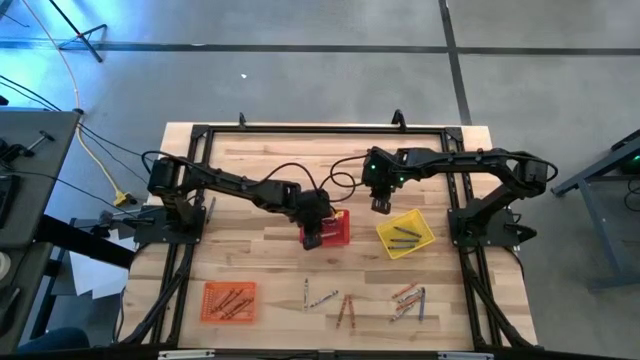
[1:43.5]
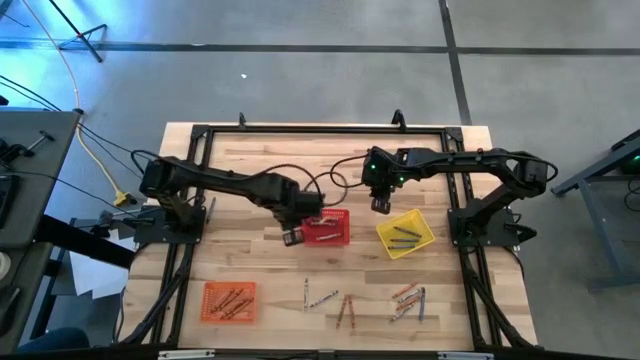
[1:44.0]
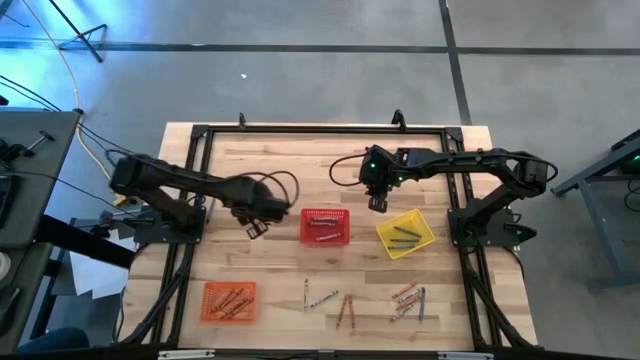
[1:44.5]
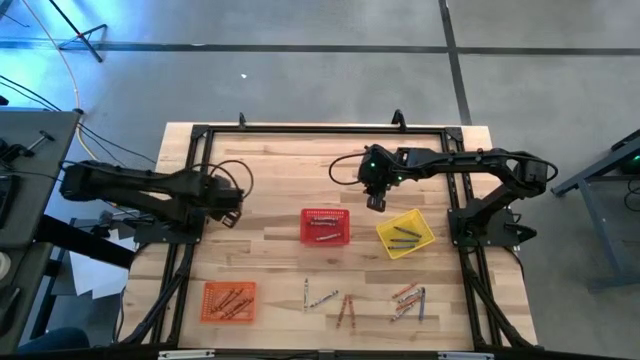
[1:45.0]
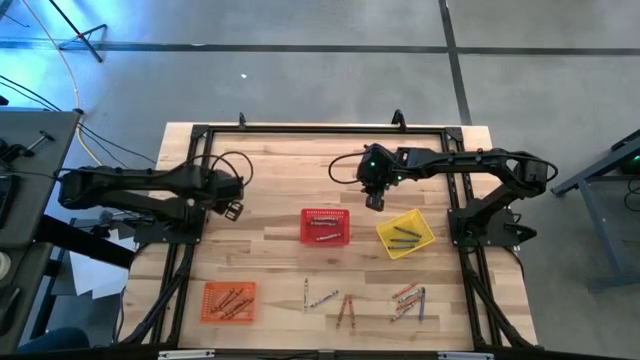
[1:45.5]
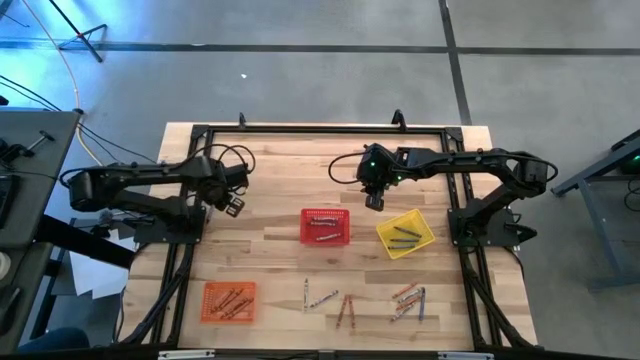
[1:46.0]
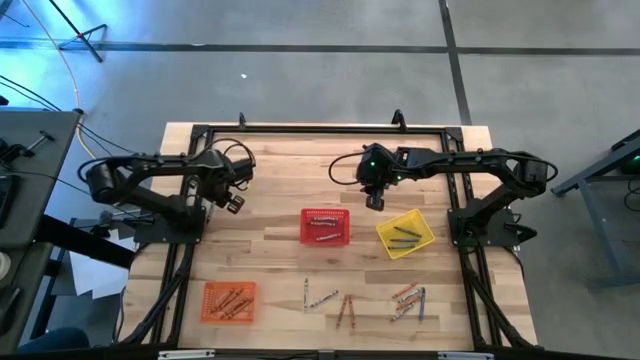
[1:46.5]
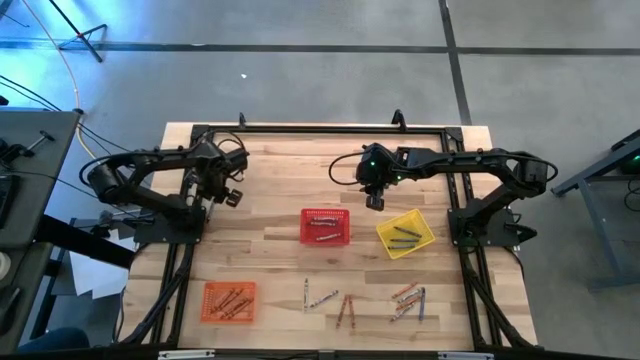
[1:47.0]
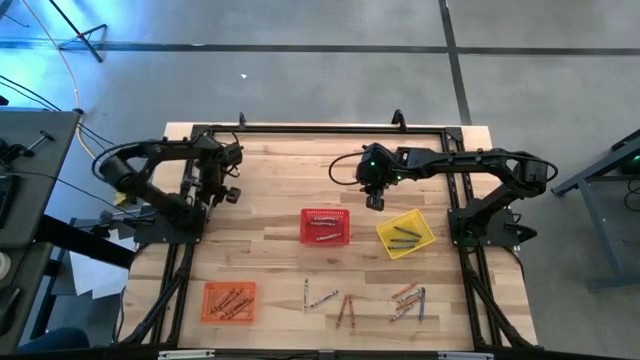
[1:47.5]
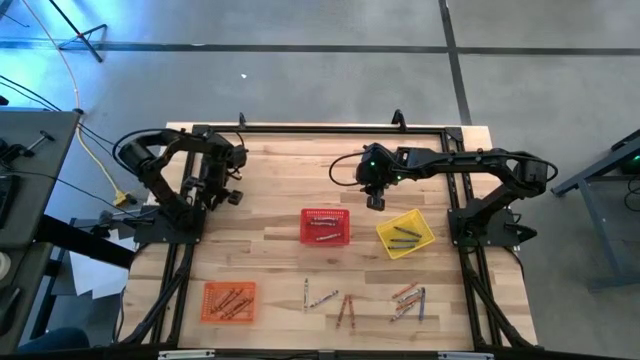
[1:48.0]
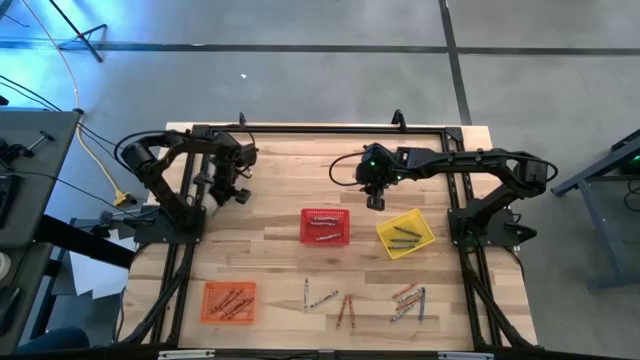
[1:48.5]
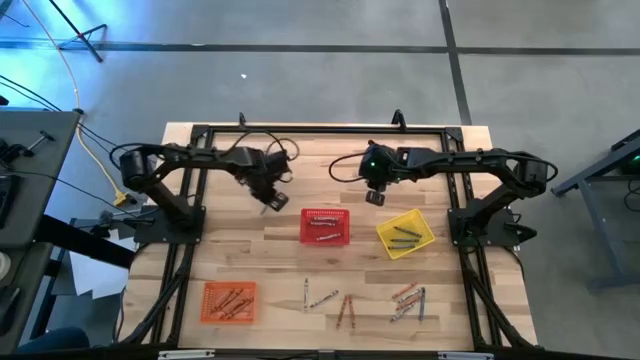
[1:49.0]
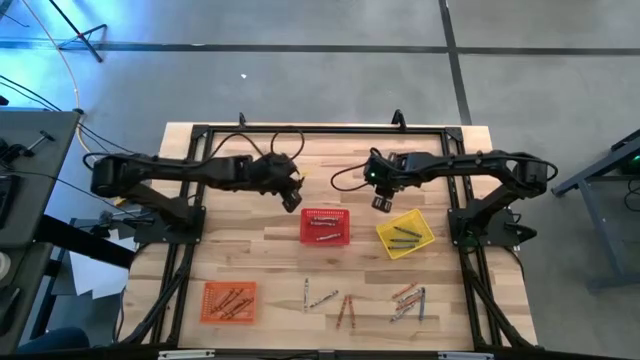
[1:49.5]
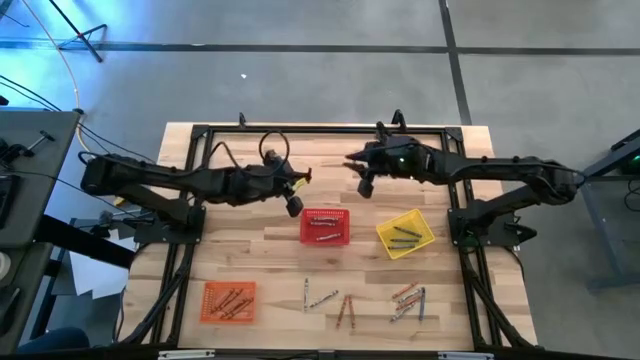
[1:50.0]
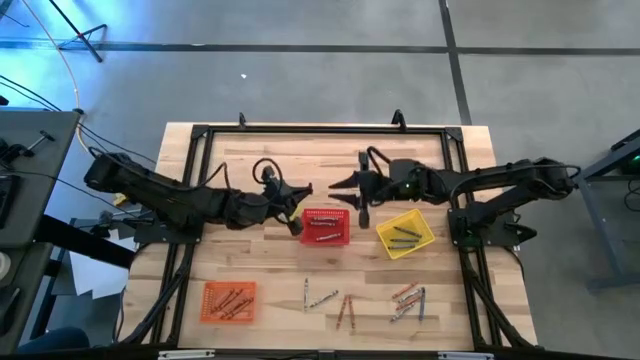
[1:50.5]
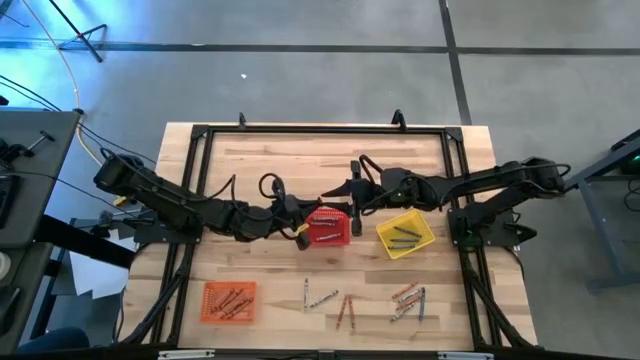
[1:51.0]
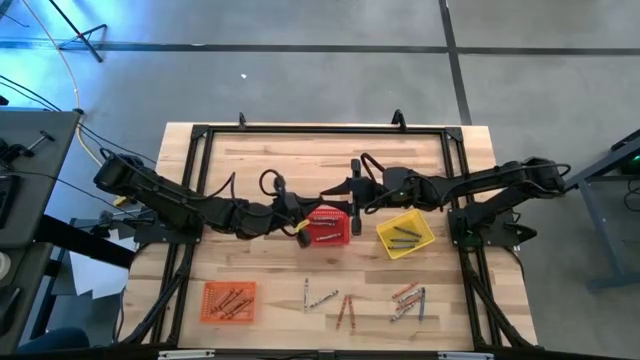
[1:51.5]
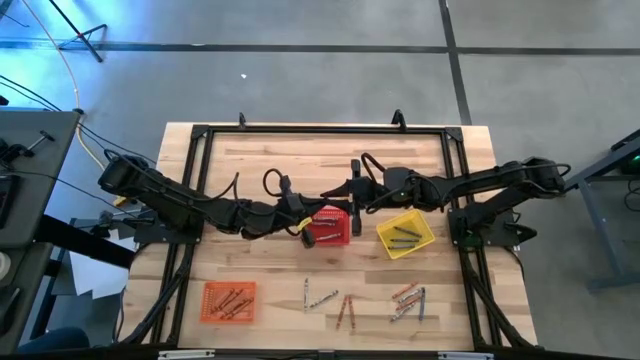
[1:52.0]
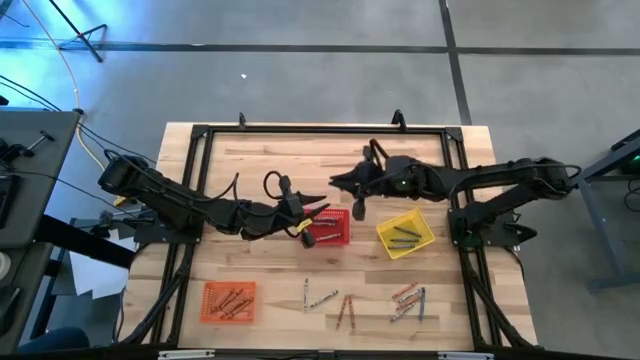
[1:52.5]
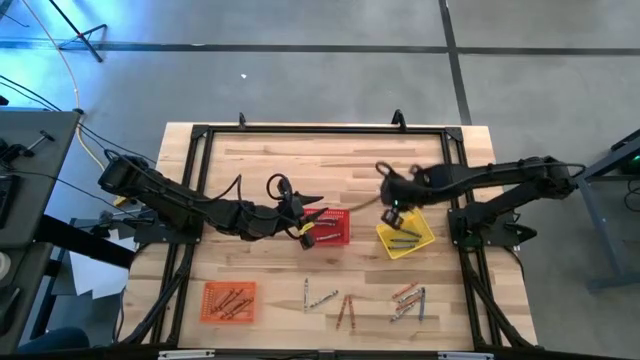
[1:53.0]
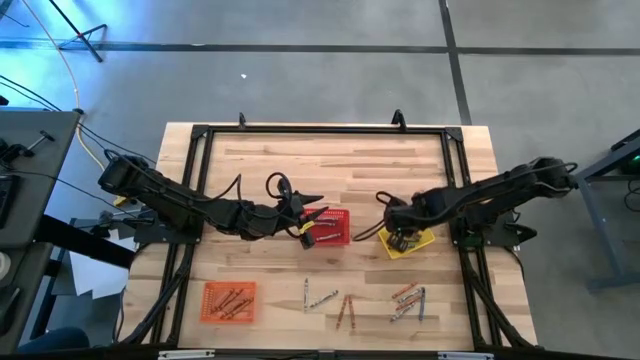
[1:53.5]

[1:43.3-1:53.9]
Task: Sort crayons
Put the blue crayon into the yellow bin

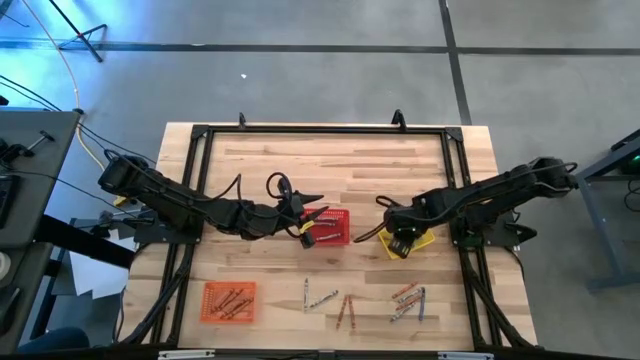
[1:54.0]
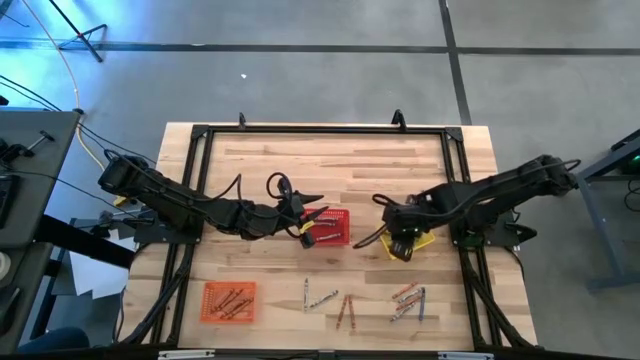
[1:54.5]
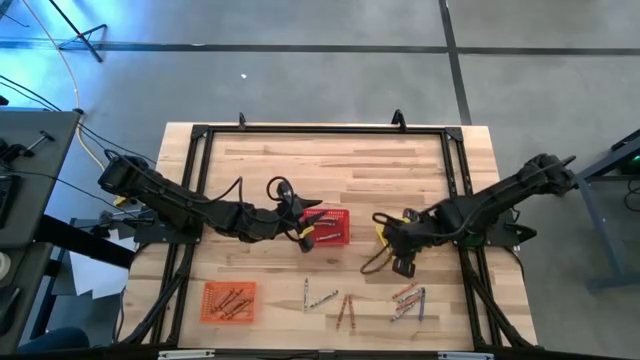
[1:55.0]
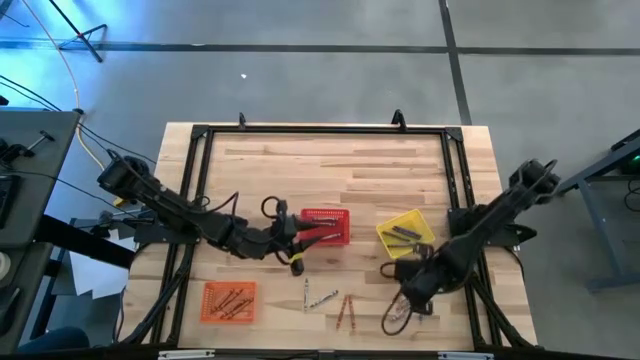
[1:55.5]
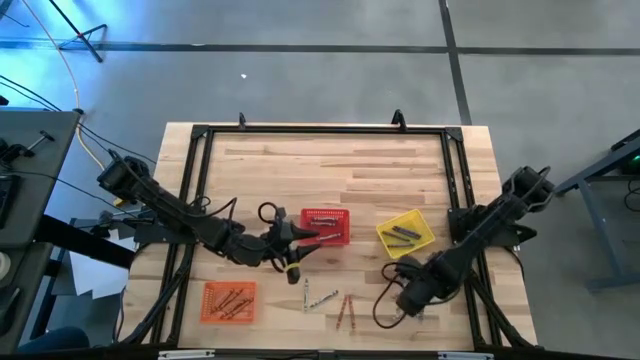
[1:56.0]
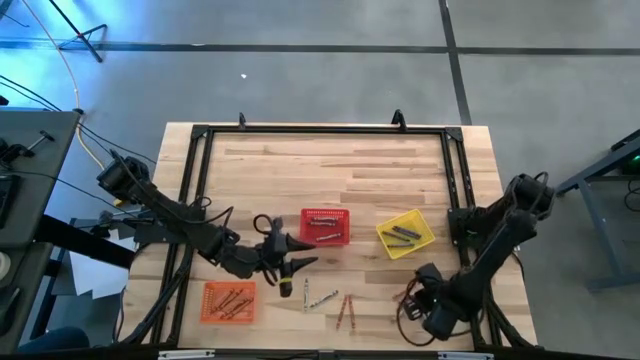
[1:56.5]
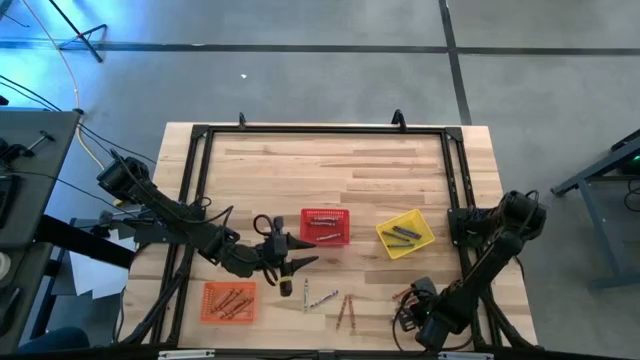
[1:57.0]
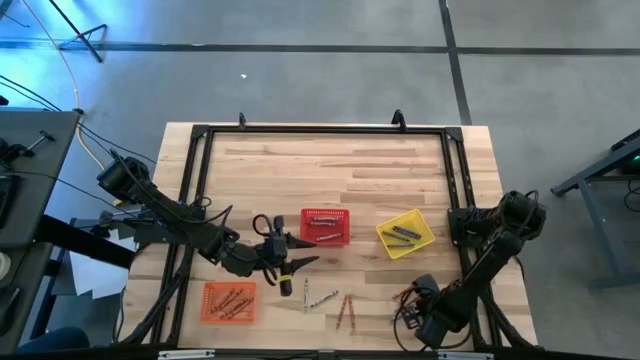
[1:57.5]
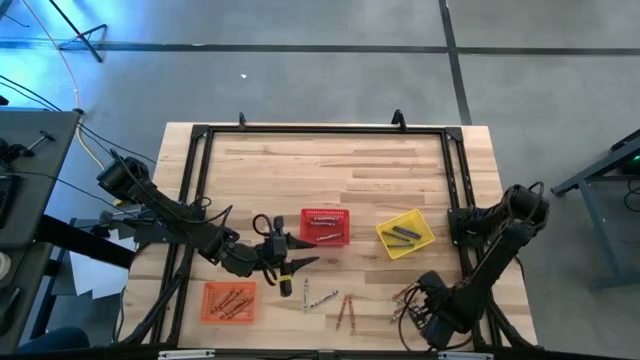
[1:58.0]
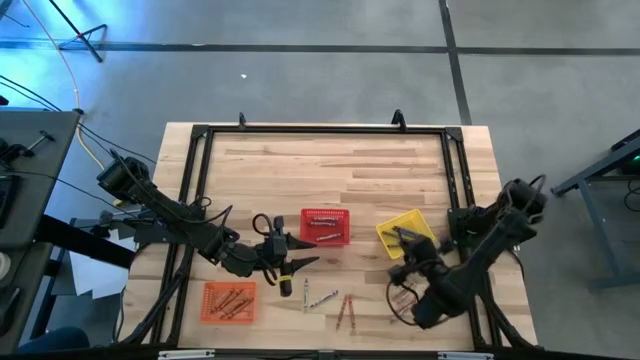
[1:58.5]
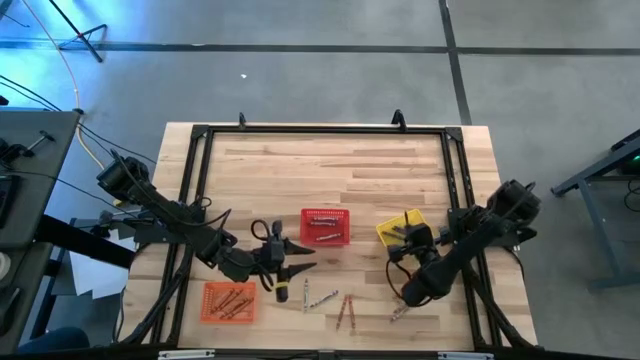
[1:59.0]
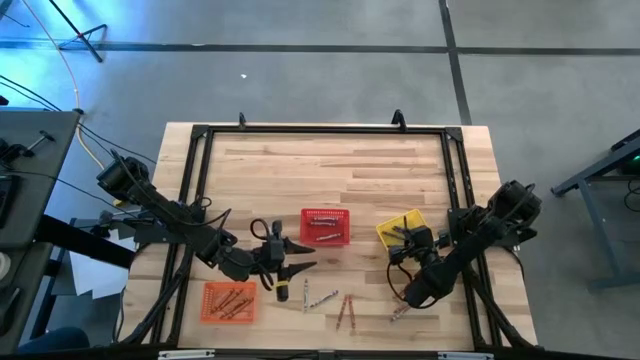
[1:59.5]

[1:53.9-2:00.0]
Put the blue crayon into the yellow bin

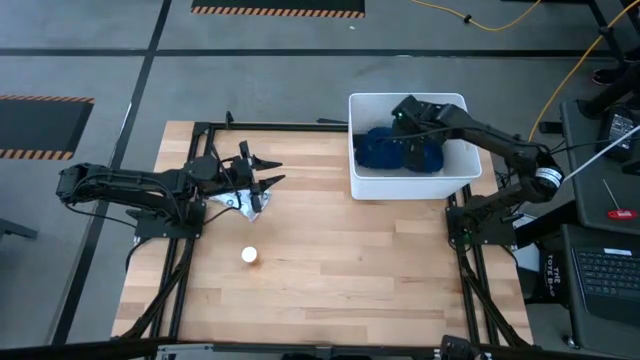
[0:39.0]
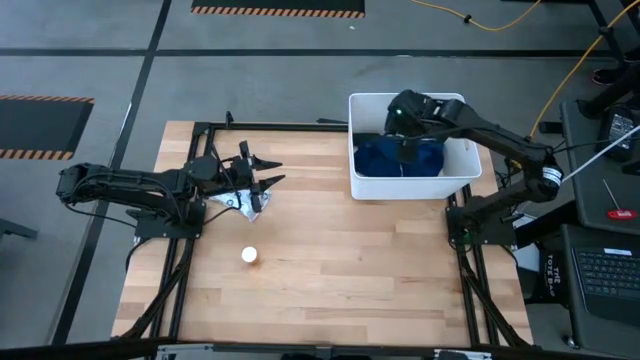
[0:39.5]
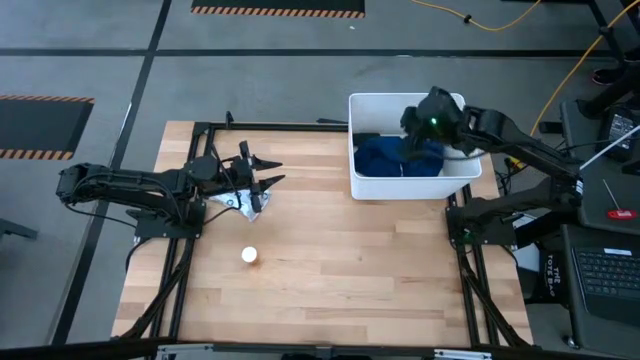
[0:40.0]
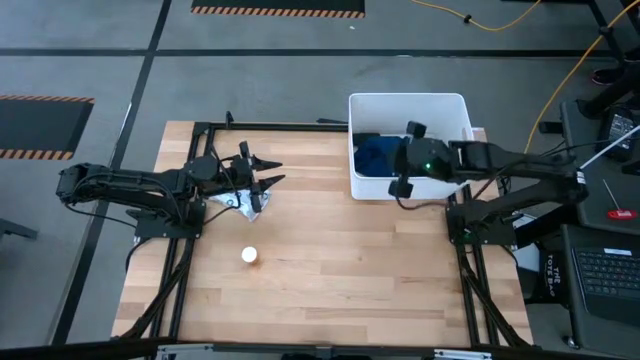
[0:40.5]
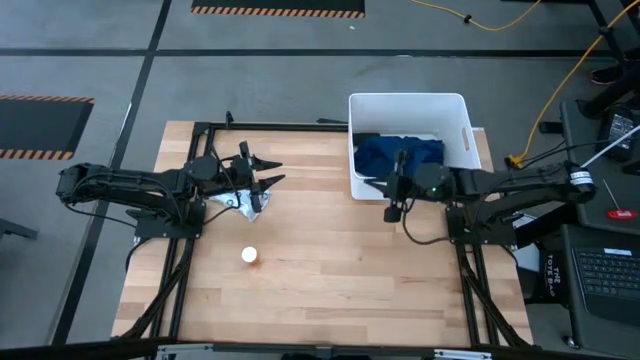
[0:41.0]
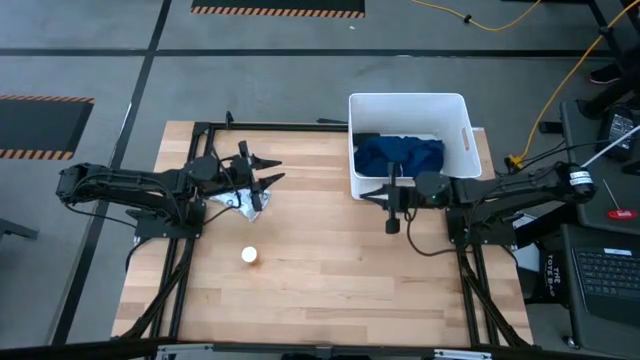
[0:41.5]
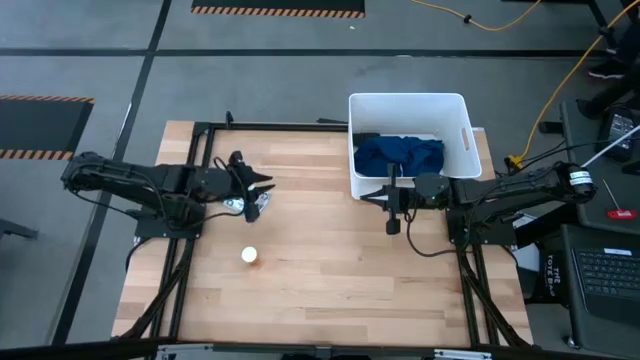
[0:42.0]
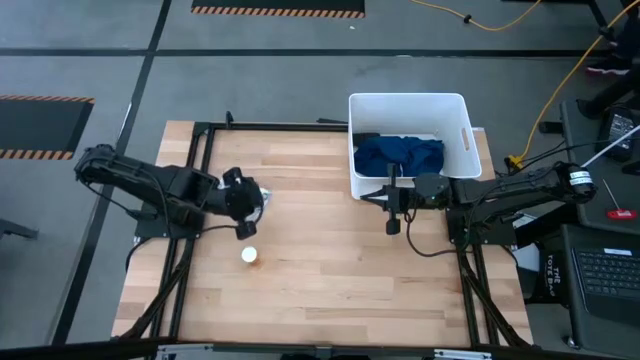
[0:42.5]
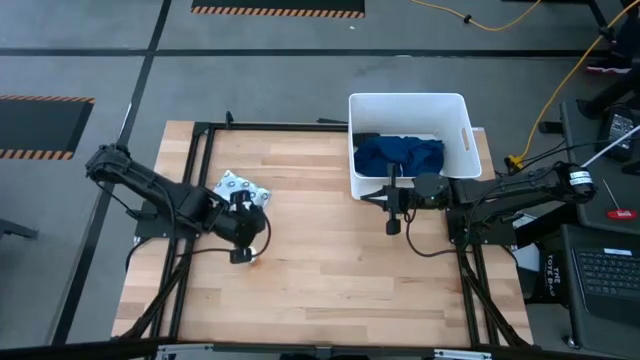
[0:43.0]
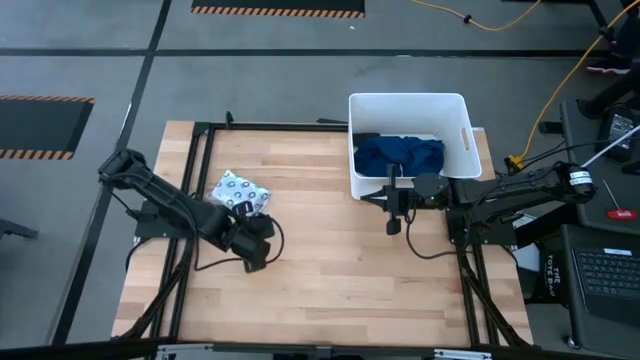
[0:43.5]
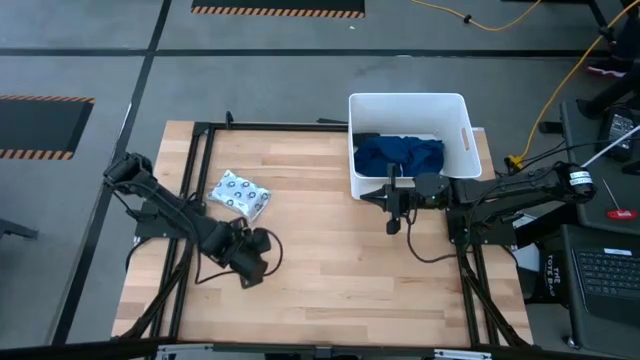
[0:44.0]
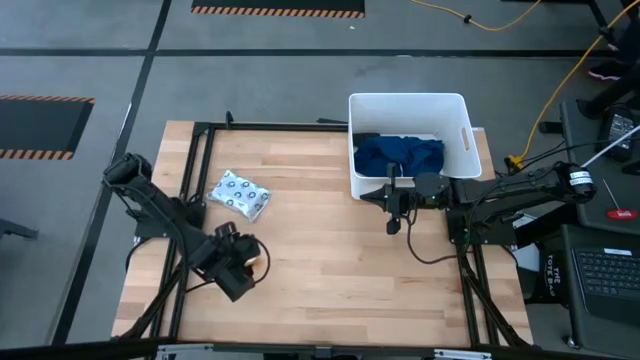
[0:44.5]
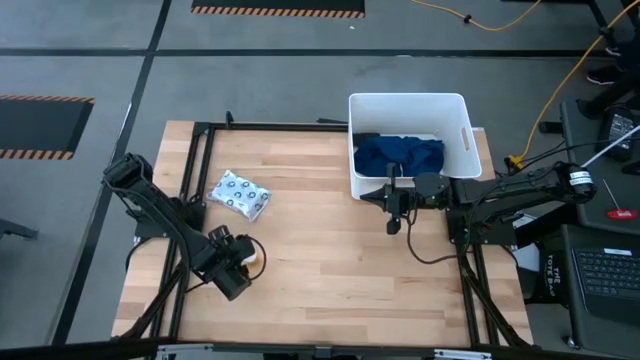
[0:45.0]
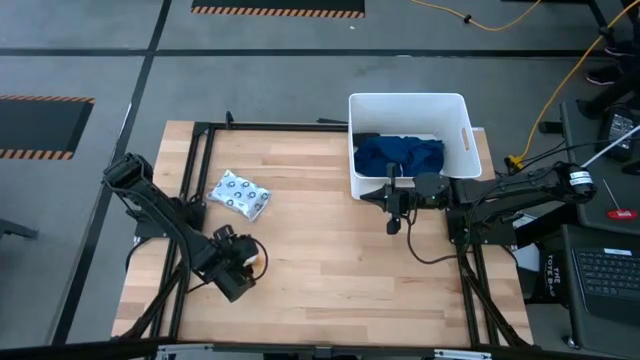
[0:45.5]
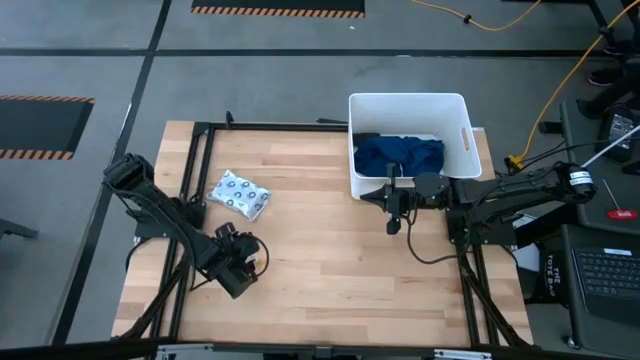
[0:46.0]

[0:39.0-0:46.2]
Task: Pick & place medical supplies in basket/bin
Put the orange pill bottle into the white container
